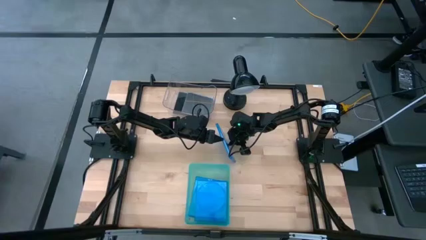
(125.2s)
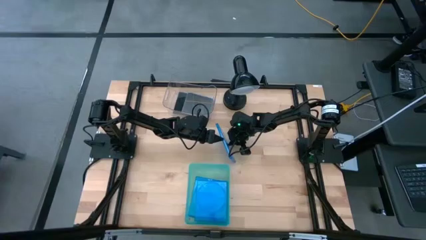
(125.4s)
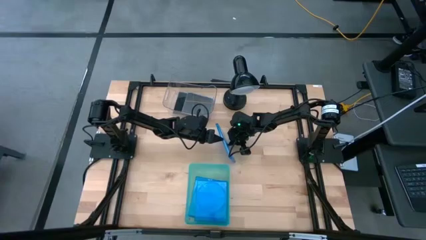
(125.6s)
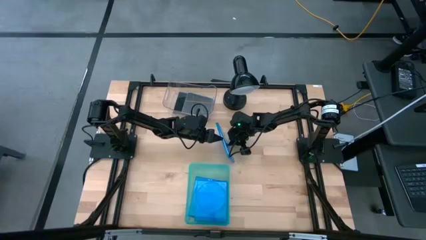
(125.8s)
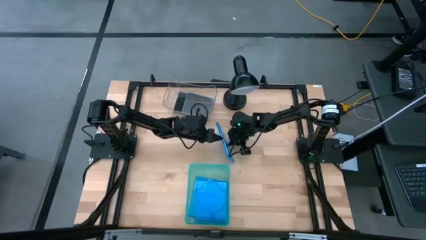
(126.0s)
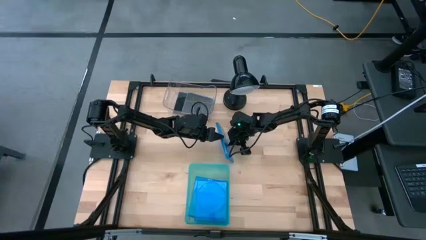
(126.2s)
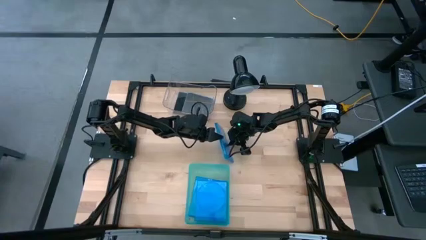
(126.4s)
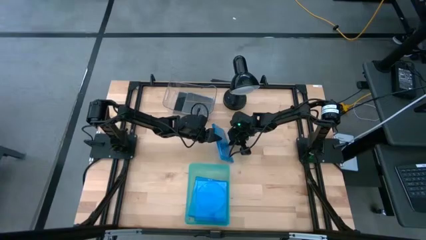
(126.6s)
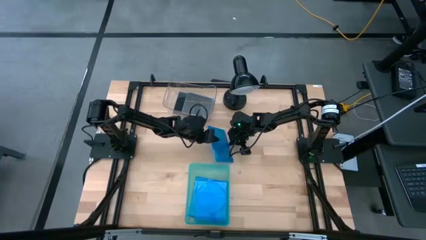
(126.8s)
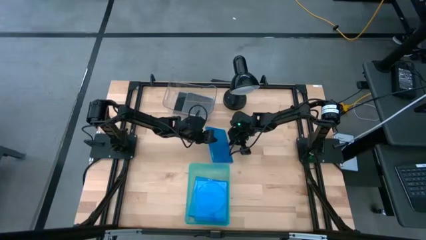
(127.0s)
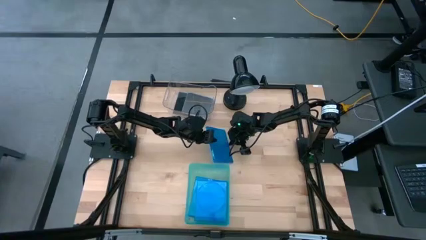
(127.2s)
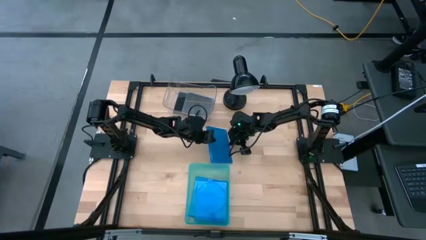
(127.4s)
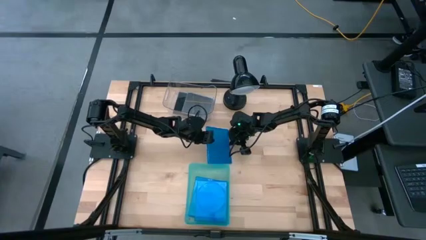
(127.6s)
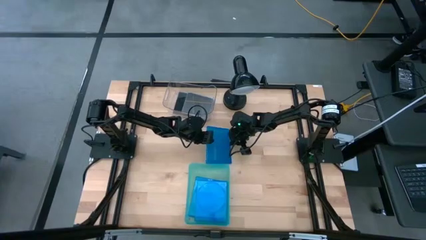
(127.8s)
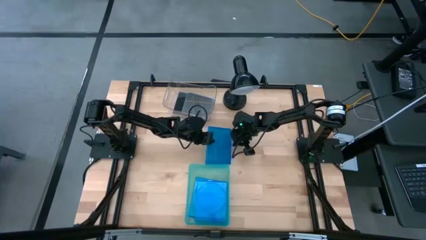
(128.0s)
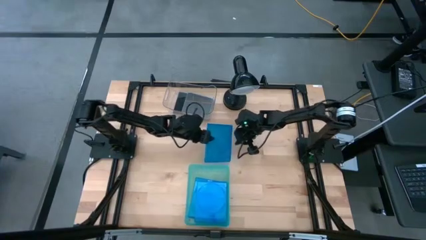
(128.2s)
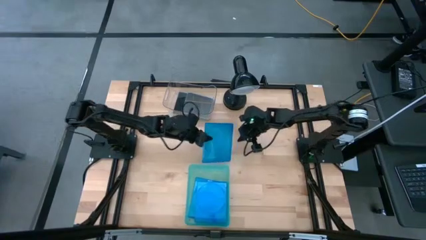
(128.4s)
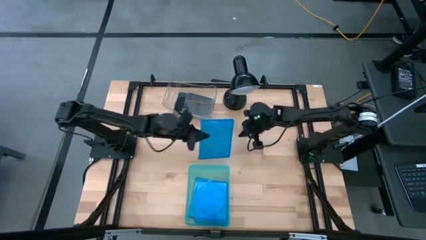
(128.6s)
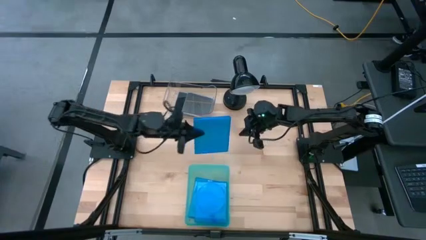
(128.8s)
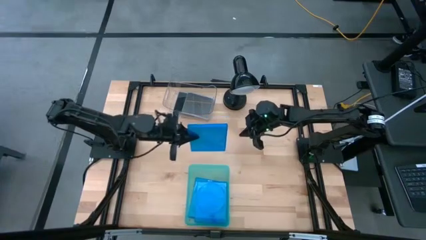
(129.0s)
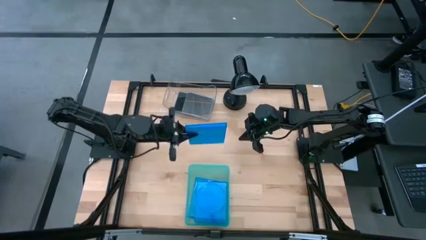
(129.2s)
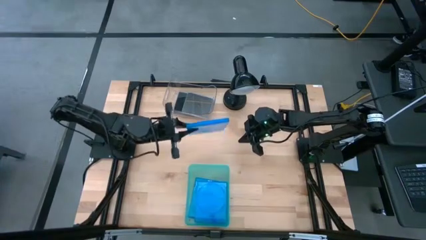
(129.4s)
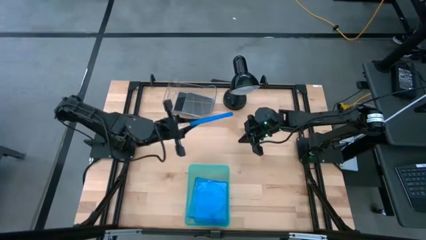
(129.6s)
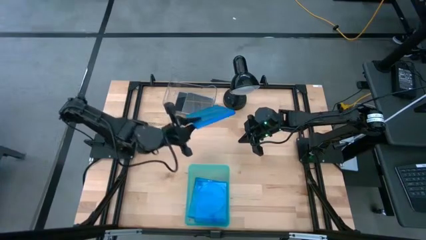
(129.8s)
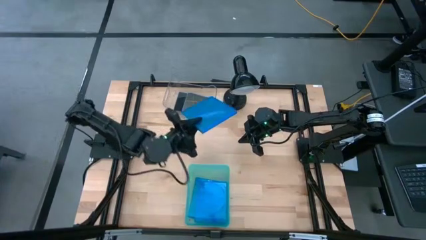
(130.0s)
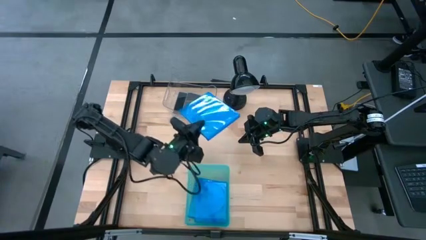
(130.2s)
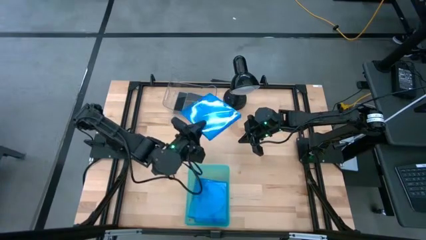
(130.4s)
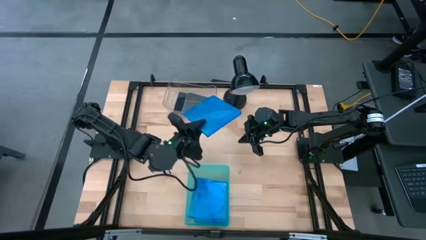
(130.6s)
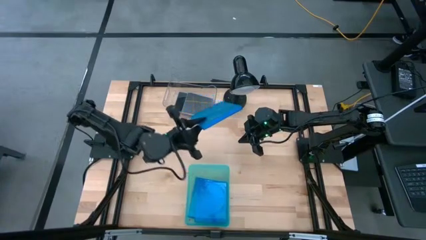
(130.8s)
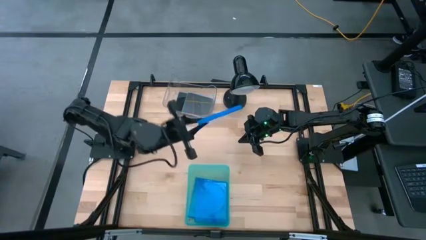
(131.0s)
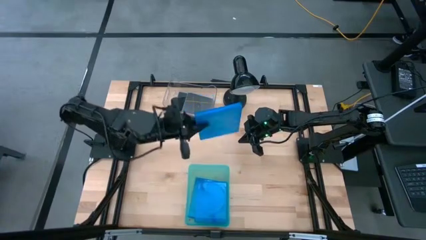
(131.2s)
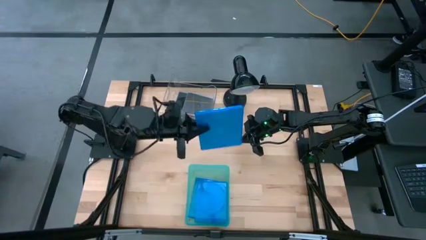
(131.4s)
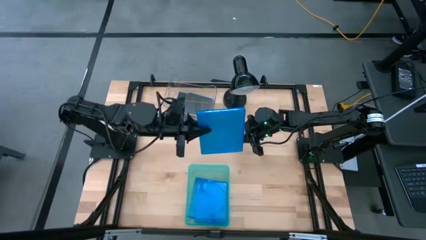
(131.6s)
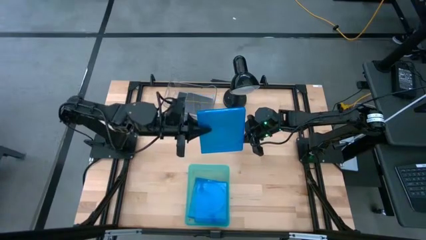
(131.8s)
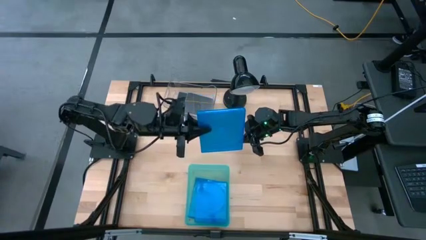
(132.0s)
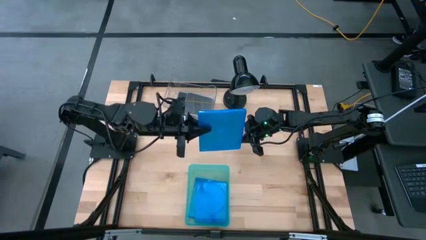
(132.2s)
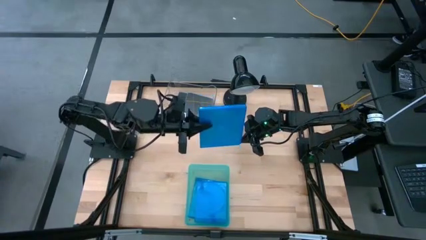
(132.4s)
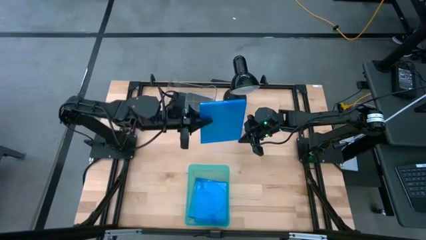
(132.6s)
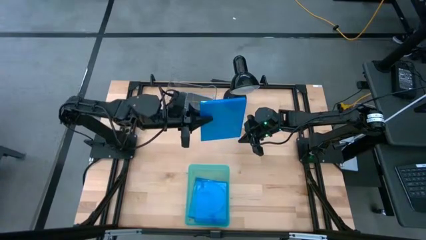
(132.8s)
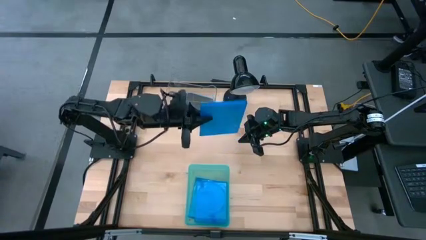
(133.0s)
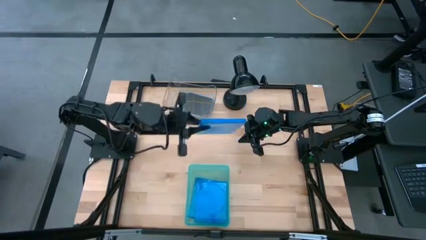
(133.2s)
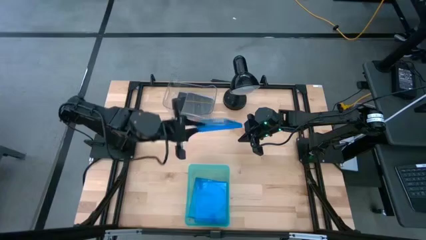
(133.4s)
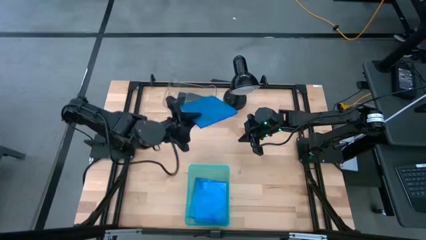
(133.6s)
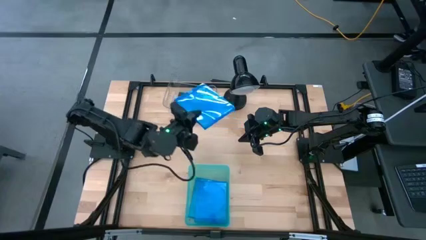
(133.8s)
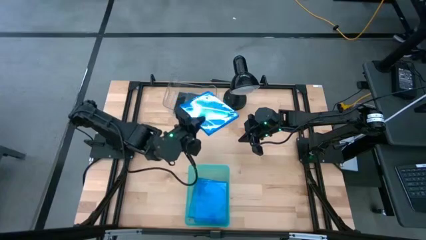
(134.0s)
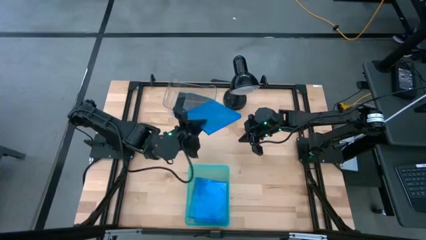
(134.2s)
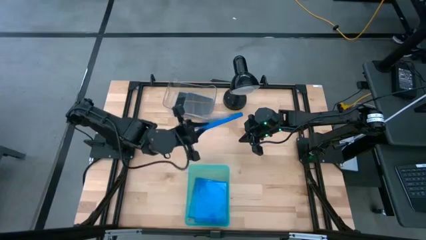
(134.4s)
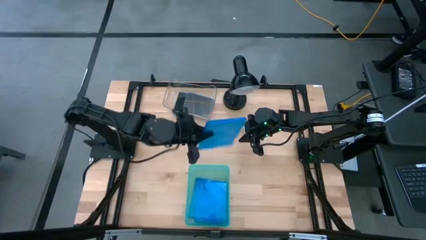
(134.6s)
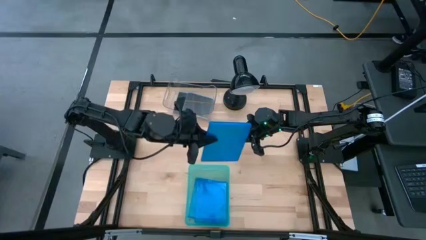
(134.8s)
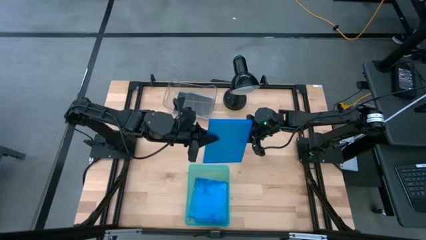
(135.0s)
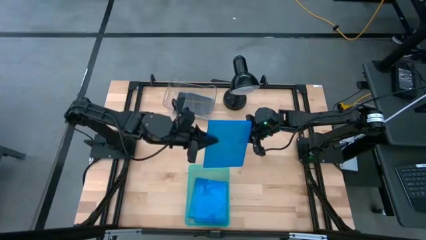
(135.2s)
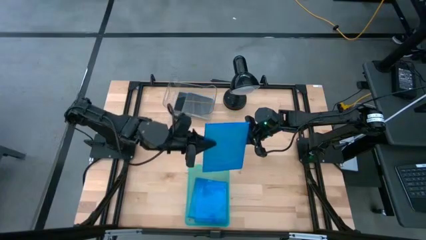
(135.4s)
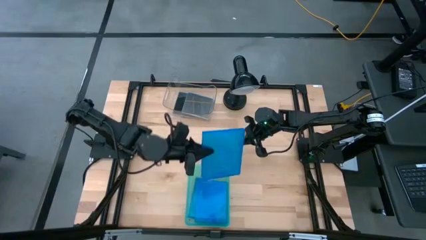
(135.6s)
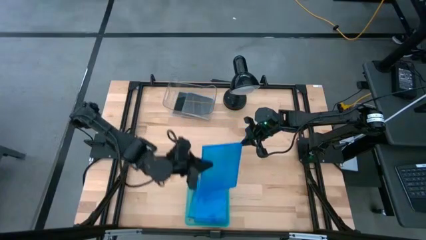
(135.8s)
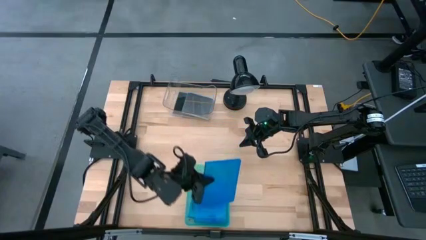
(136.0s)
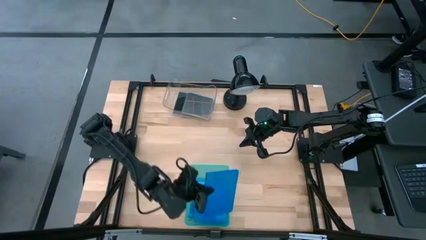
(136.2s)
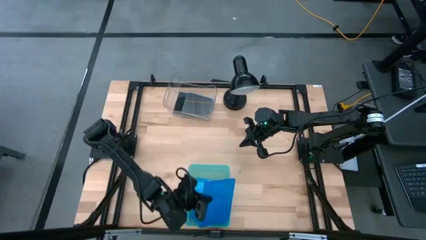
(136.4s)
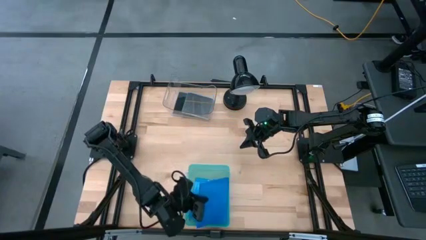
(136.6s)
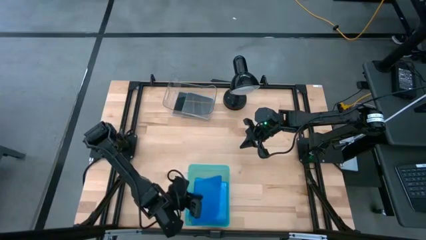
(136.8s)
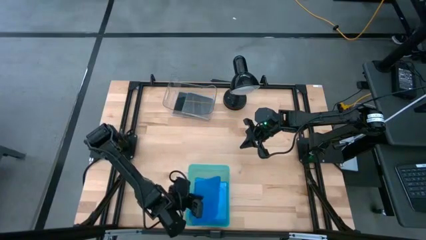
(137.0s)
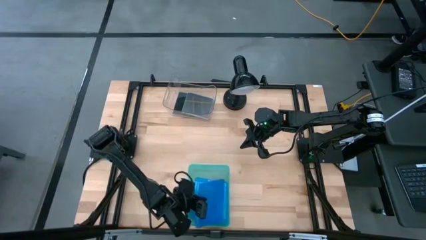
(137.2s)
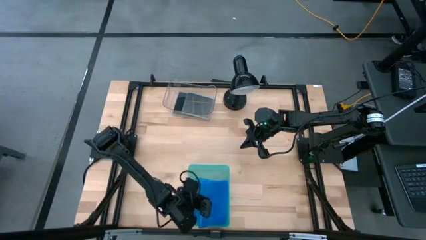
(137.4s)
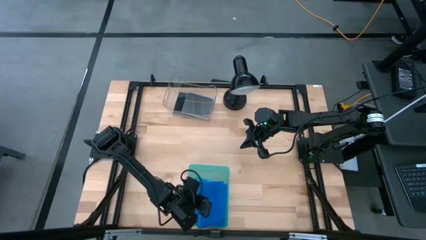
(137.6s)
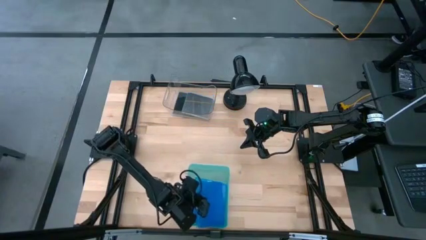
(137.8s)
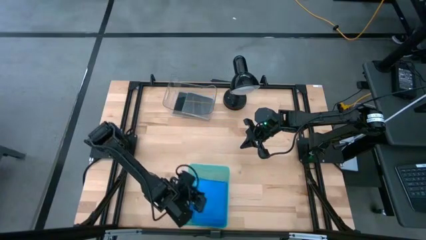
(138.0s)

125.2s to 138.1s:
Task: Pick & place jewel cases by type
Put the blue CD case into the green bin
